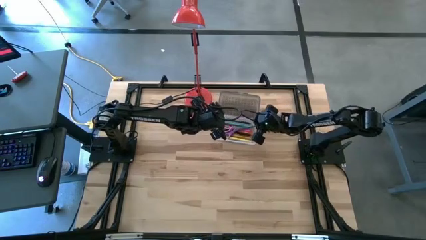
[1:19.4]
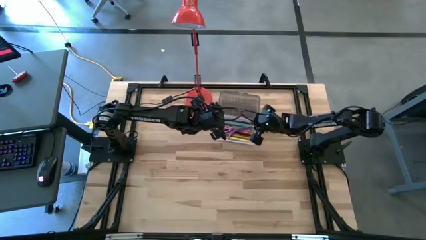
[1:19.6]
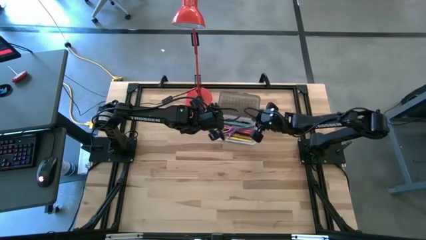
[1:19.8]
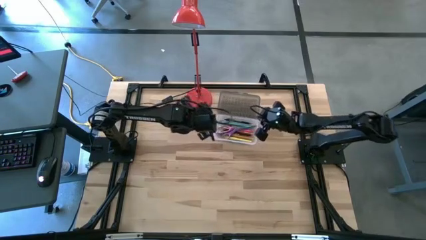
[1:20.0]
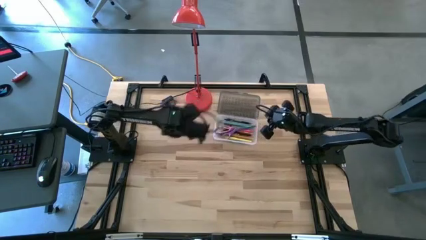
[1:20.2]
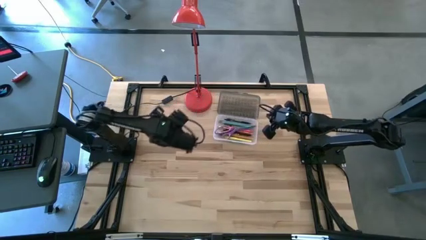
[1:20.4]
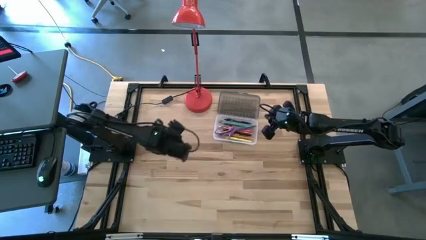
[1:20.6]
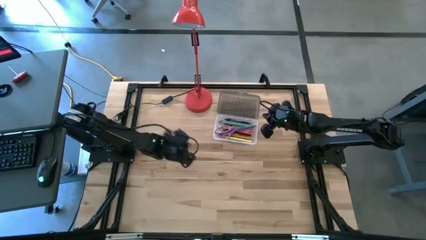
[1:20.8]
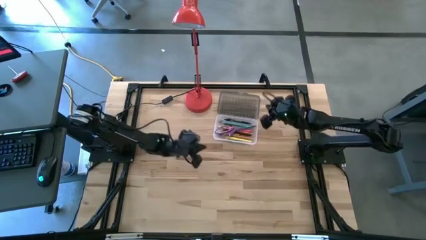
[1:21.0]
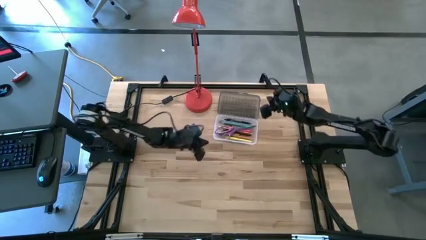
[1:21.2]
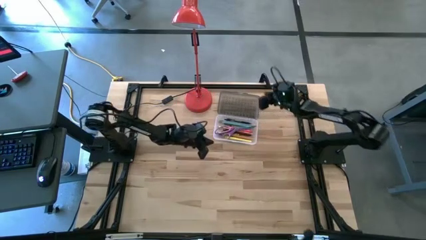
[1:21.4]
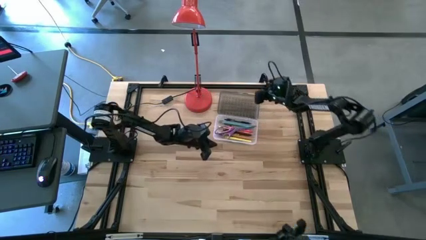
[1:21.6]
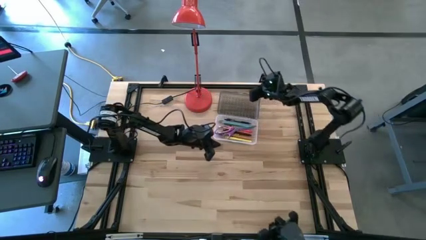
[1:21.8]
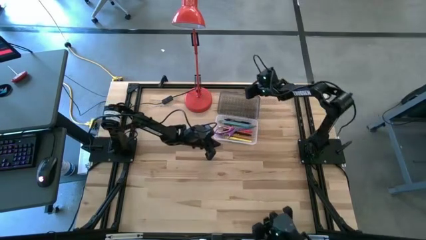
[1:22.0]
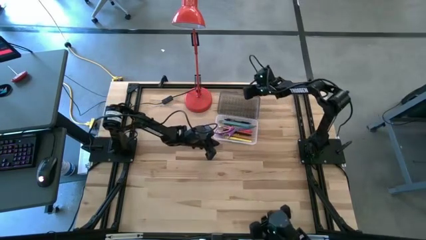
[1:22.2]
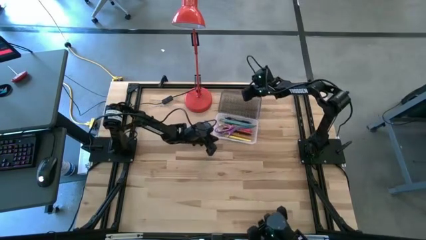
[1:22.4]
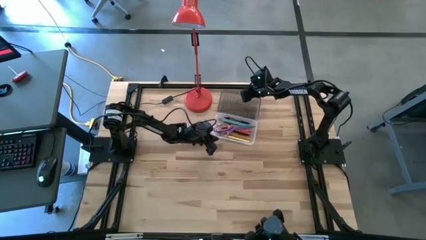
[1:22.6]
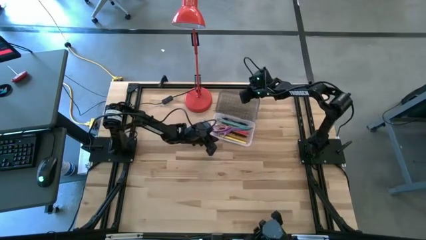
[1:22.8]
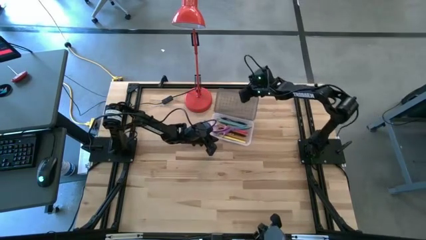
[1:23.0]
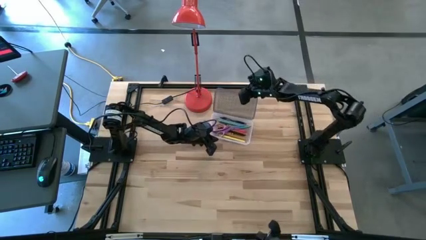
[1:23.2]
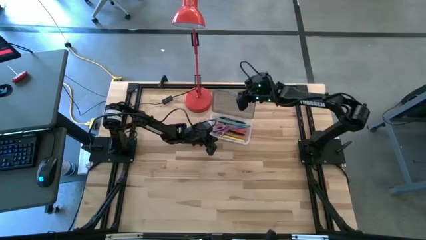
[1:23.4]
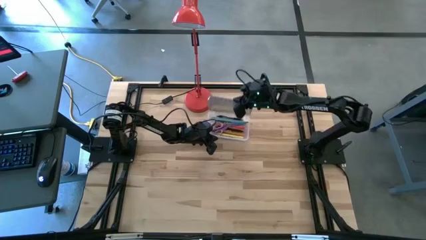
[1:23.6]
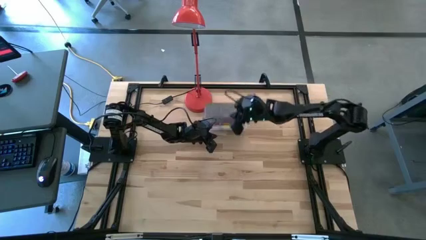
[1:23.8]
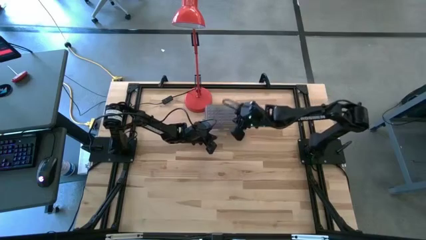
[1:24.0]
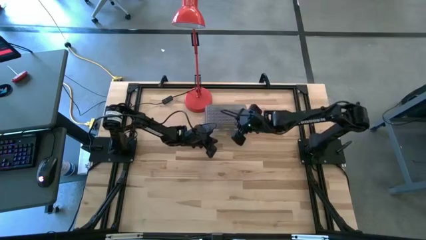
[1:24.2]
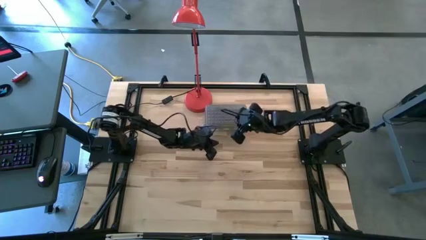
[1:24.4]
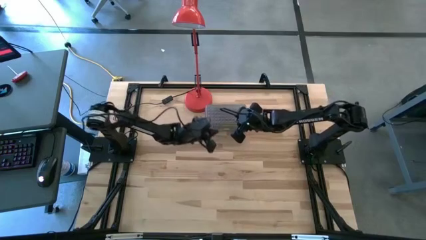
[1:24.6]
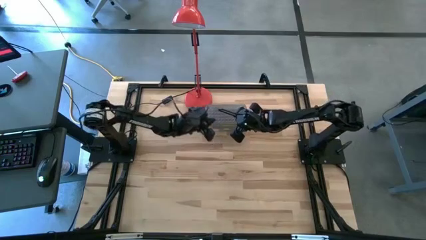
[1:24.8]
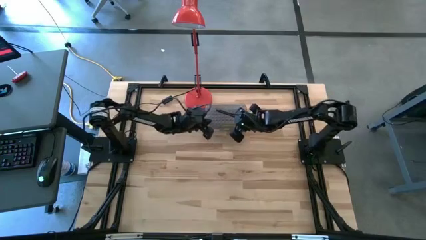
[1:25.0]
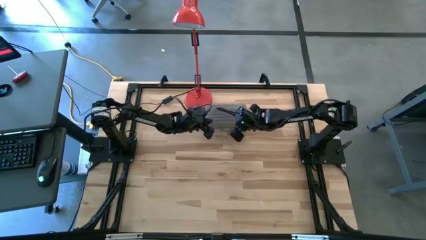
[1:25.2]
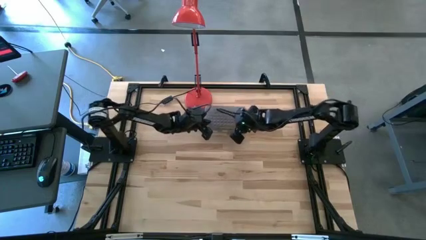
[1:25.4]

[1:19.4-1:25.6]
Task: Pick & place school supplies into a supply box
Close the black supply box

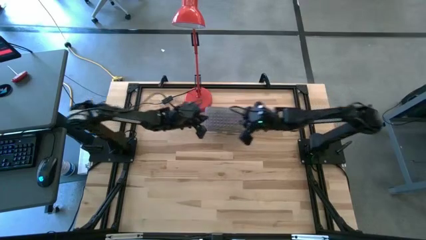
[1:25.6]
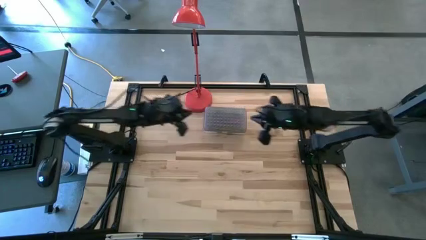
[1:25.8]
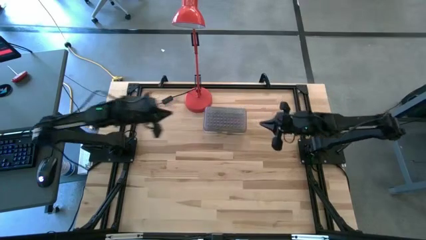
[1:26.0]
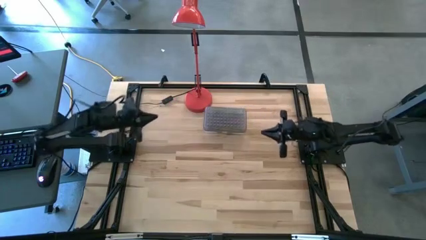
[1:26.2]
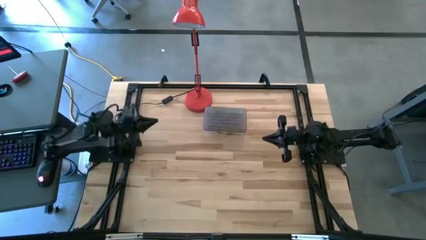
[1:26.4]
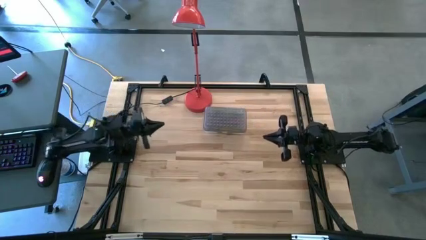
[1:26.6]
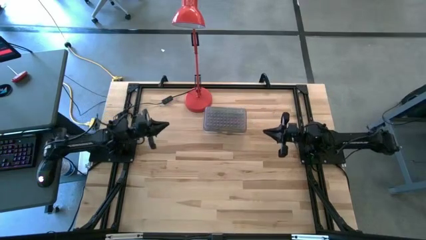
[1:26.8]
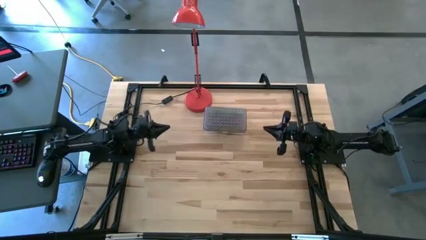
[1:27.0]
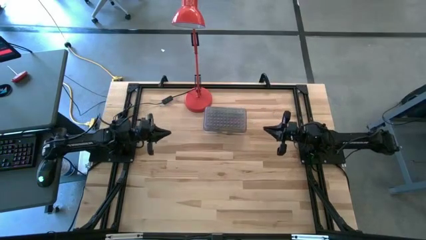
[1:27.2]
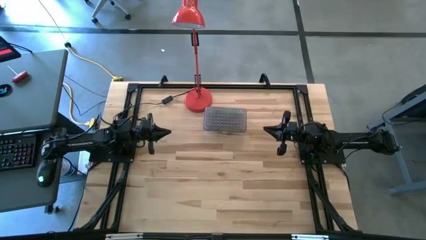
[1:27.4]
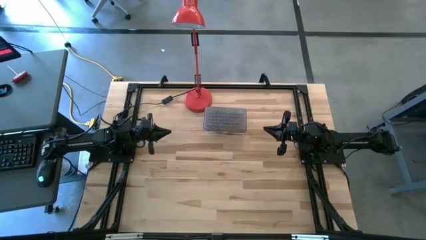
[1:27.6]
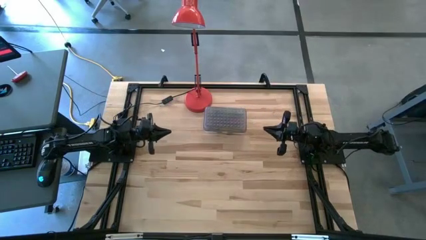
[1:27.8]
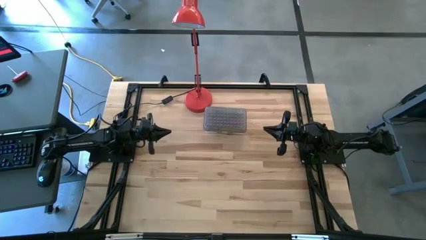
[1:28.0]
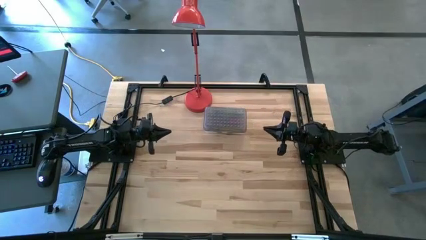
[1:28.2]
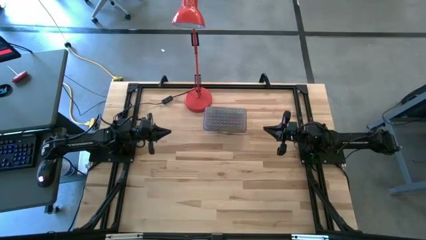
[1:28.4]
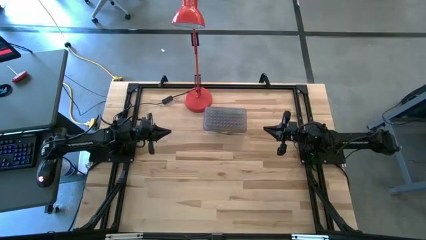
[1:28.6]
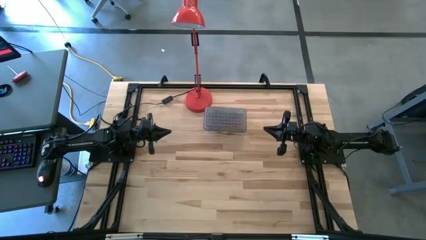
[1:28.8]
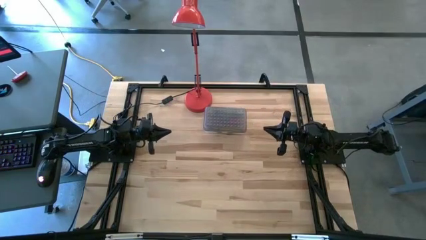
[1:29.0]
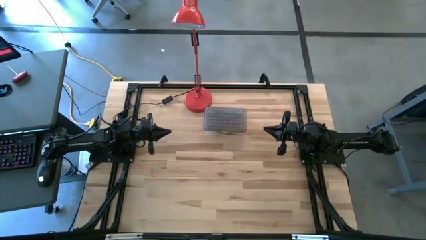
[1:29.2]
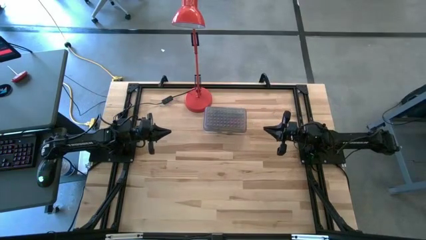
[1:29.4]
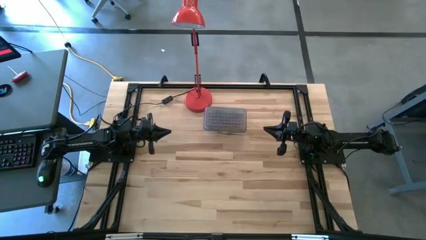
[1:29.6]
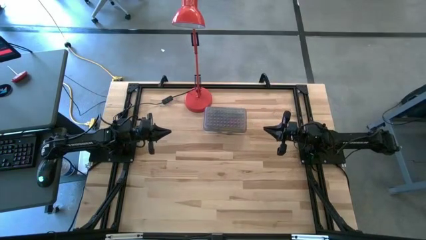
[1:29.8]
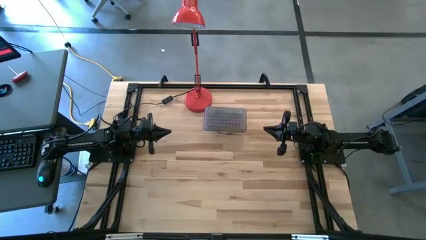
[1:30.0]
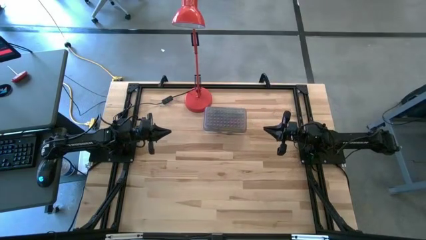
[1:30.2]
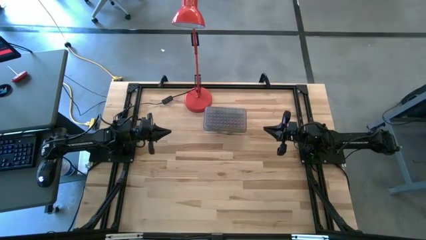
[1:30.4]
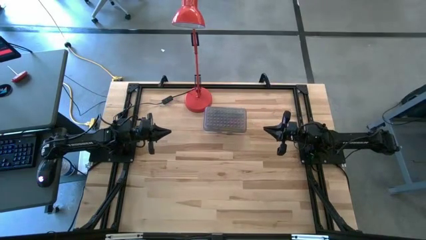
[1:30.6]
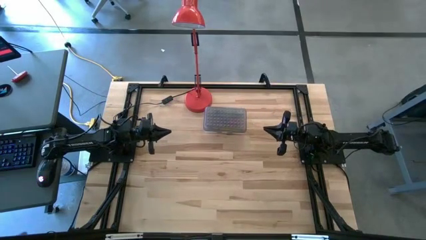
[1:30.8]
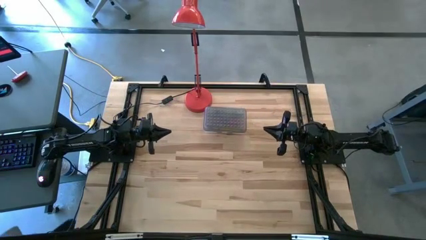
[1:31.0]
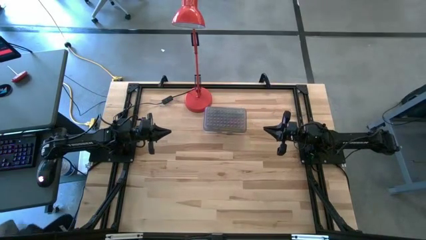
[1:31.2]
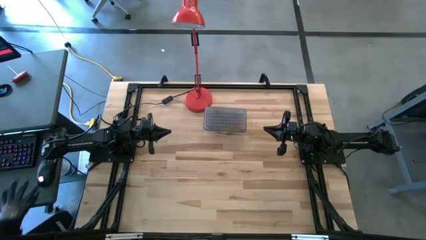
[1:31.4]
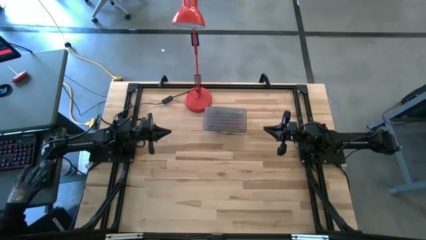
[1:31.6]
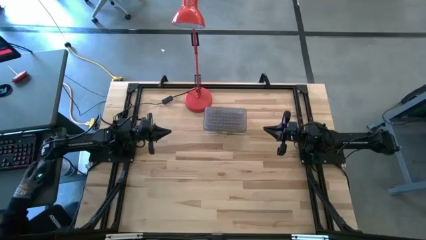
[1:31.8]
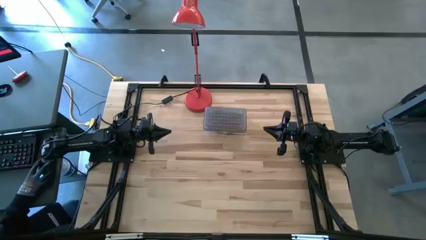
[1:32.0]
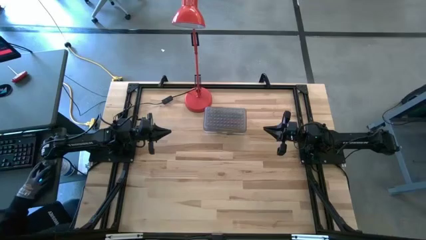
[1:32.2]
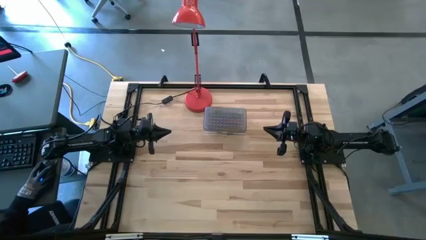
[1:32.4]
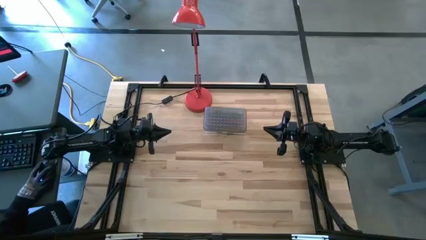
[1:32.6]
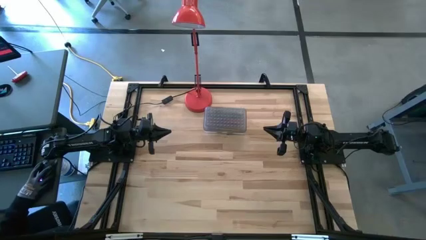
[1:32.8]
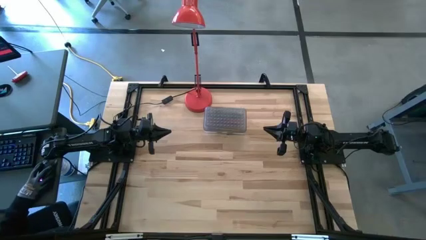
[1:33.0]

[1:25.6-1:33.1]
Return to Home Position

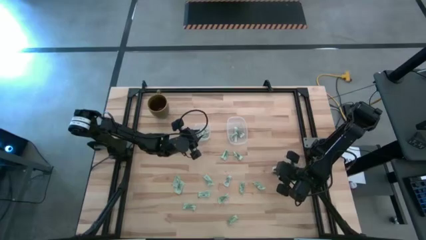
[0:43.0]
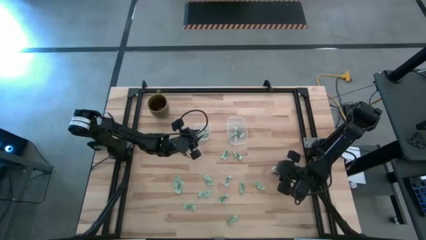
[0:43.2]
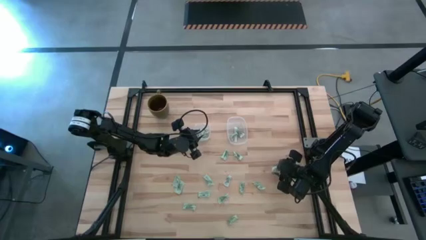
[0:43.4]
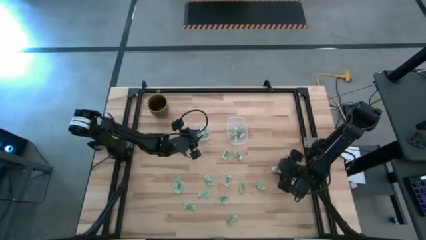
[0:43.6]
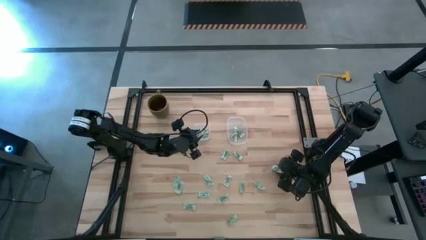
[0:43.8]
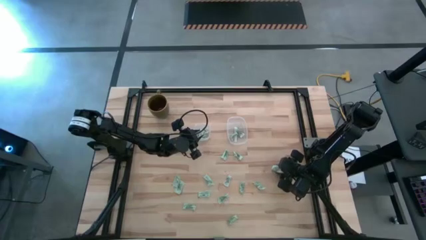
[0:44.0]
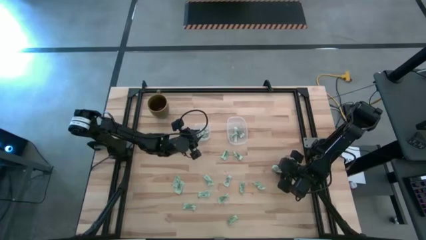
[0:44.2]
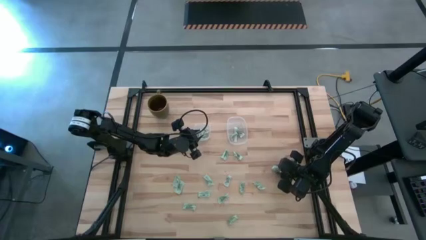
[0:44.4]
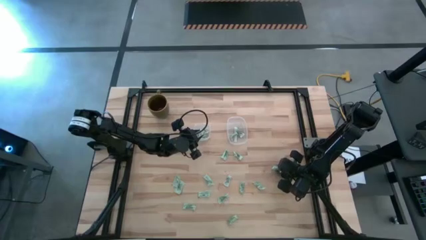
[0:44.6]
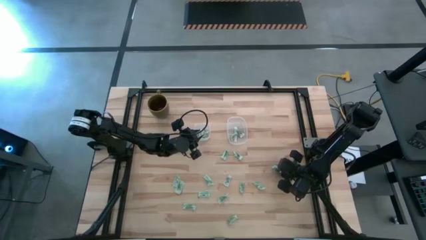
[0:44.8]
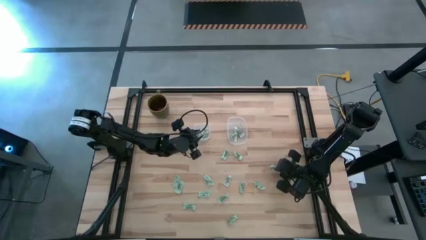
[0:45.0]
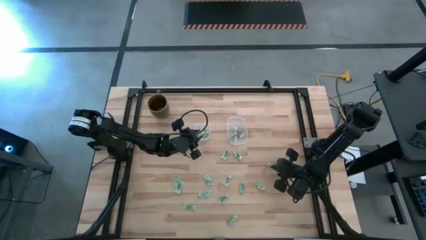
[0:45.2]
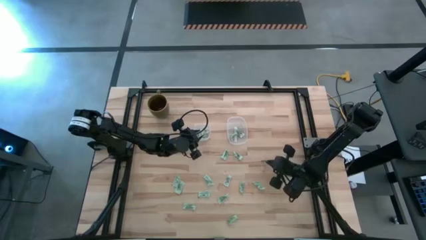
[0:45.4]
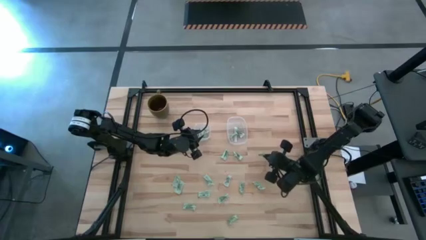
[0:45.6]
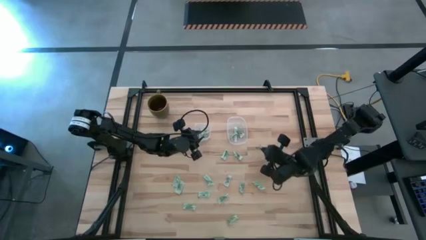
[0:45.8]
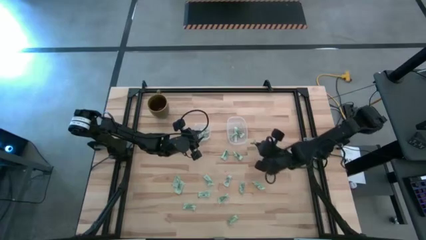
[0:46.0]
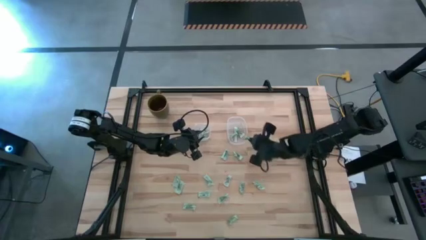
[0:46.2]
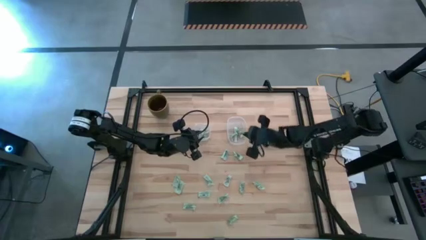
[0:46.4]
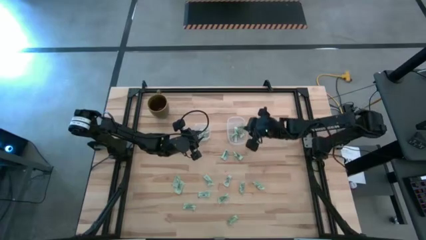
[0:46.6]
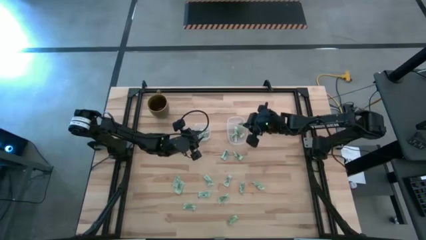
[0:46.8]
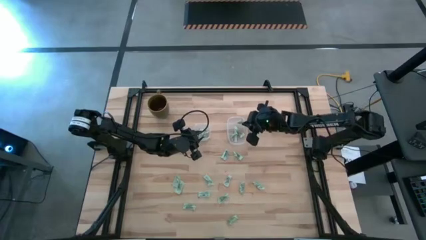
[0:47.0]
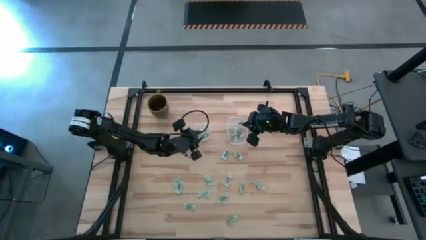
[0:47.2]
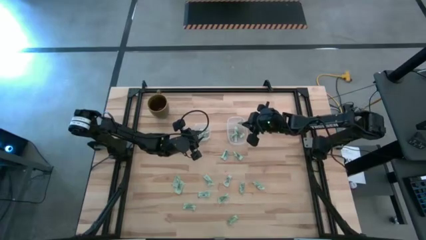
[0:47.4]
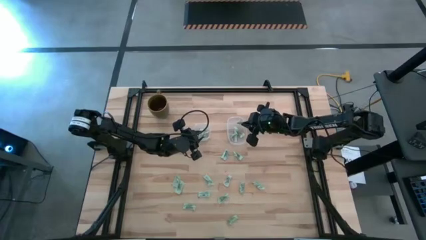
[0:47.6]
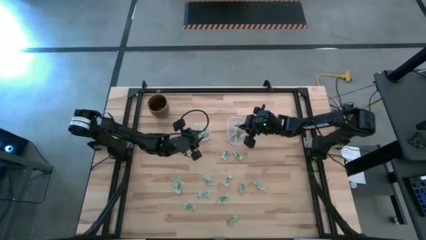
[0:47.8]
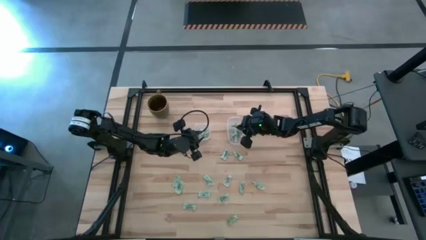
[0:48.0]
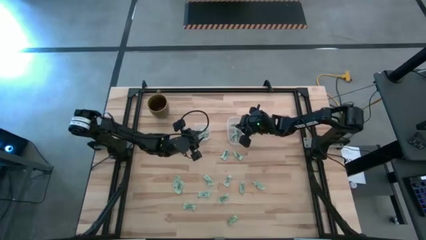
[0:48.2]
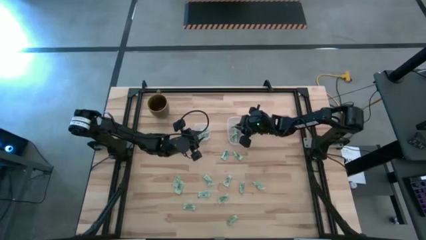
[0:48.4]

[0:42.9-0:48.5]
Task: Pick and place items into bin
Put the light green stevia packet into the right transparent bin
